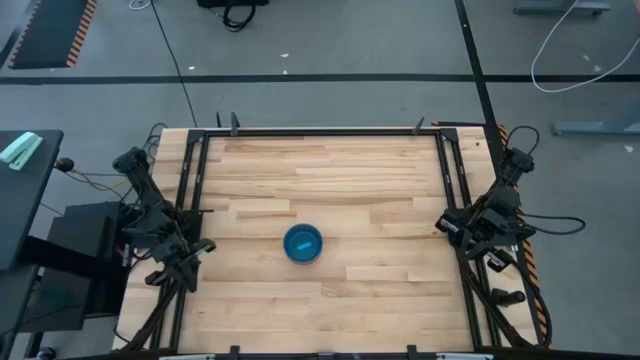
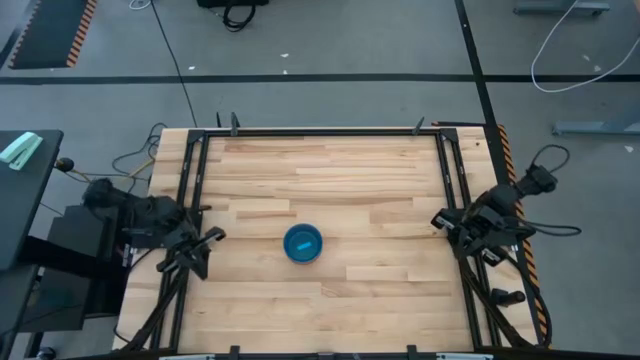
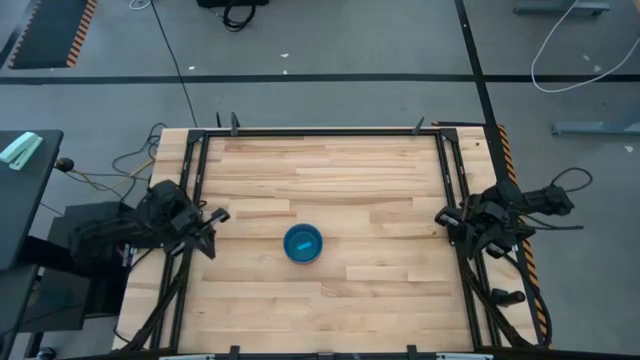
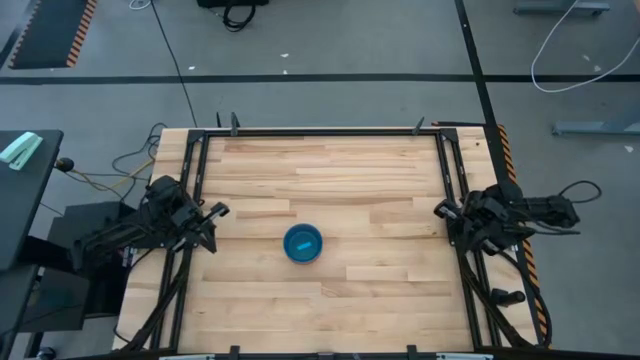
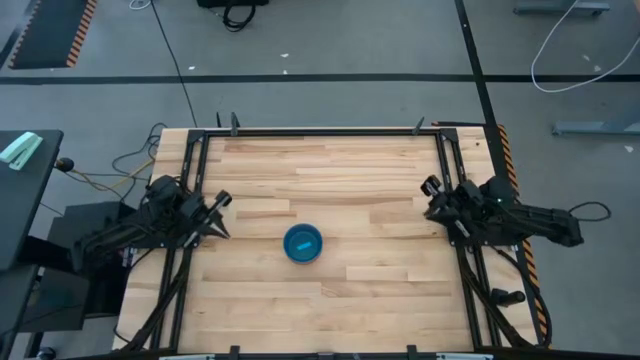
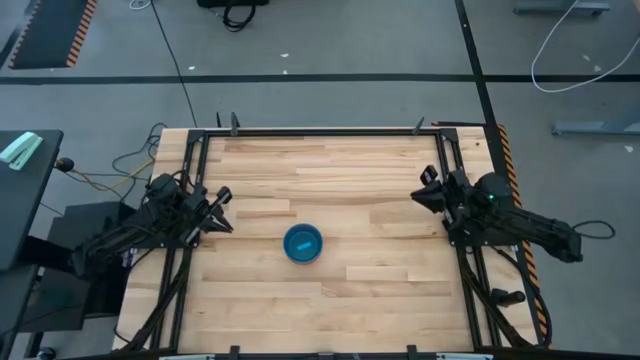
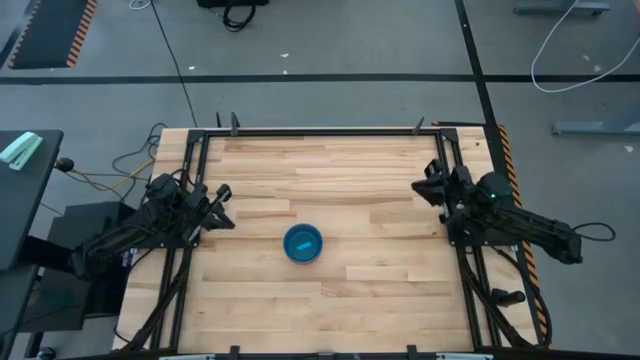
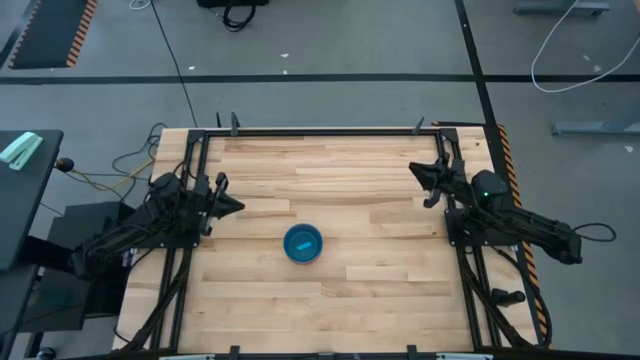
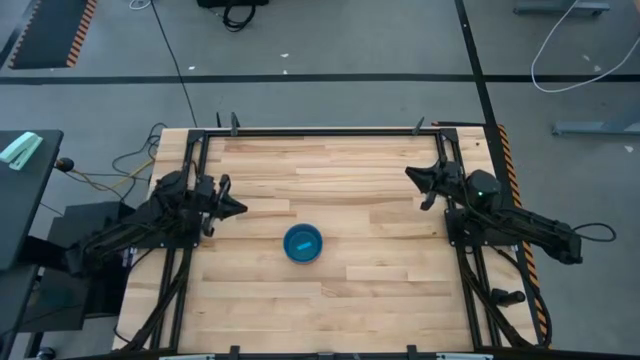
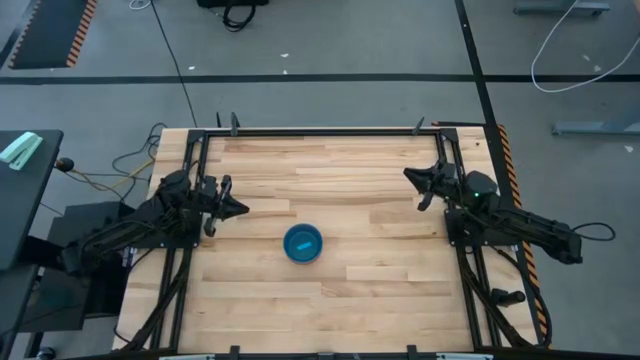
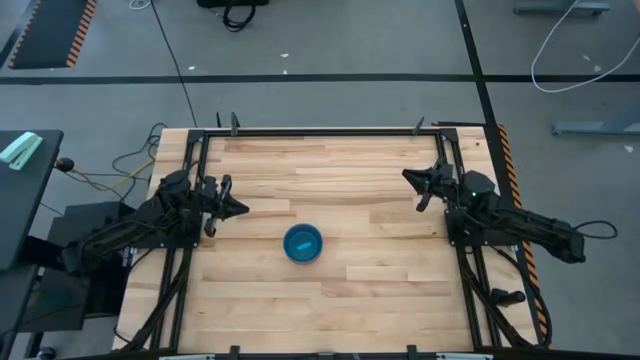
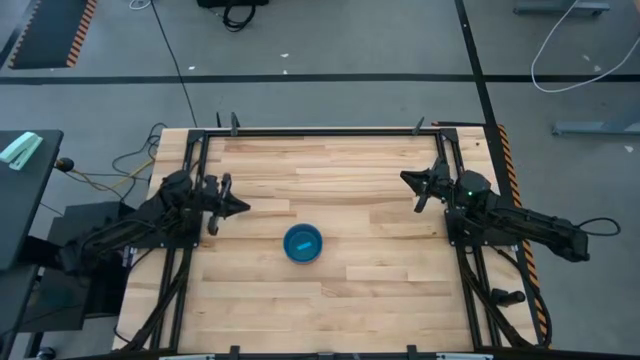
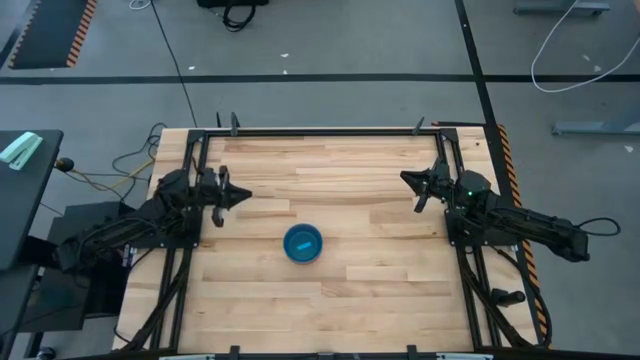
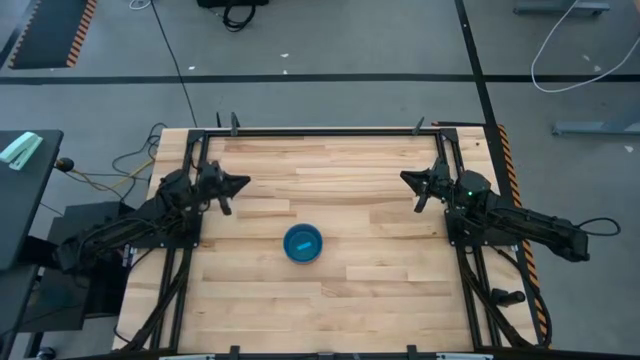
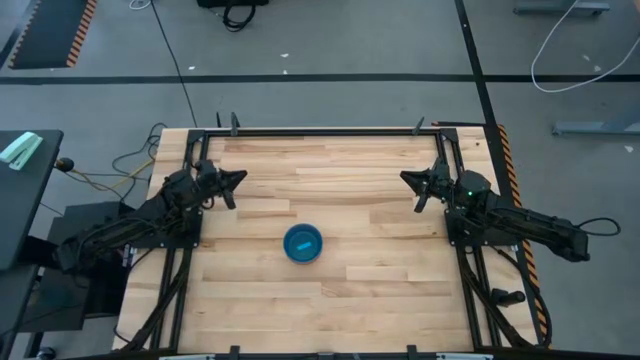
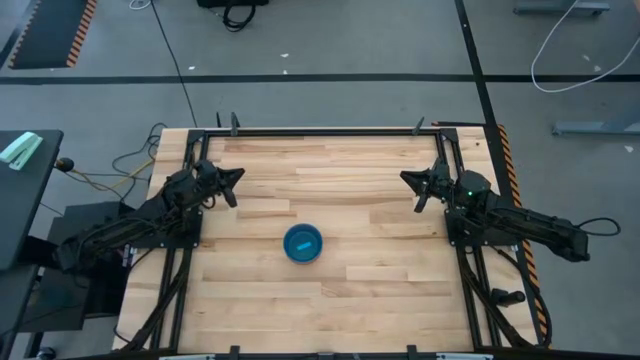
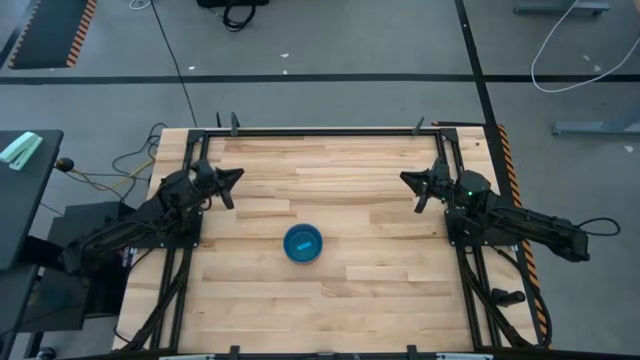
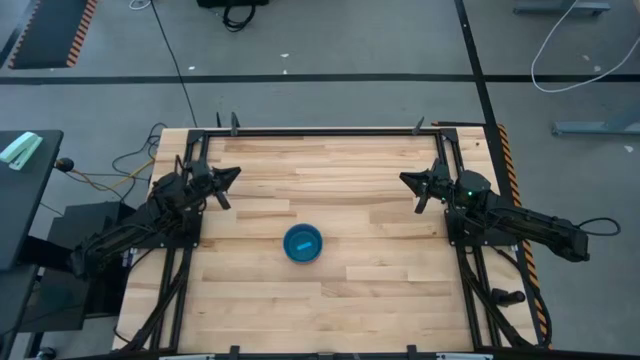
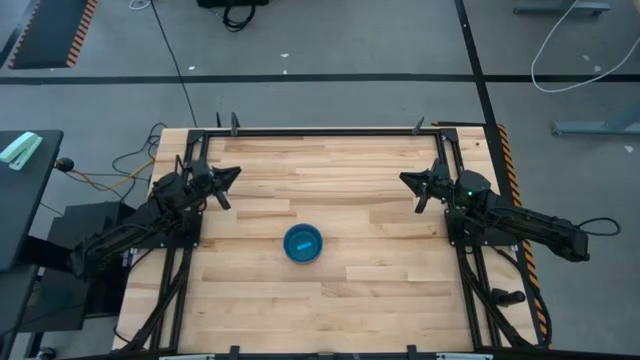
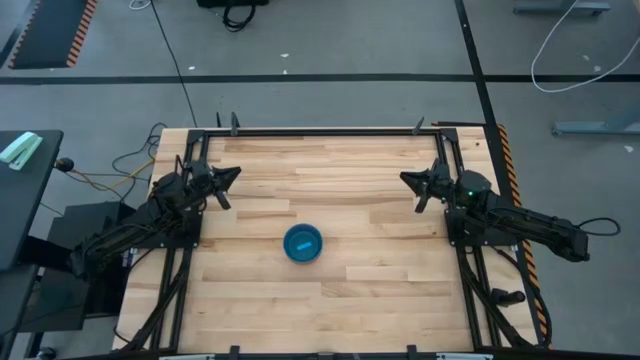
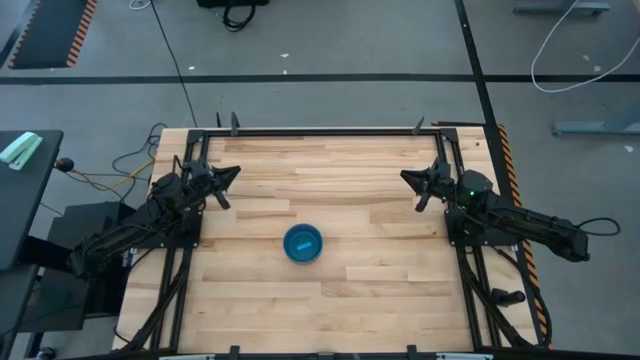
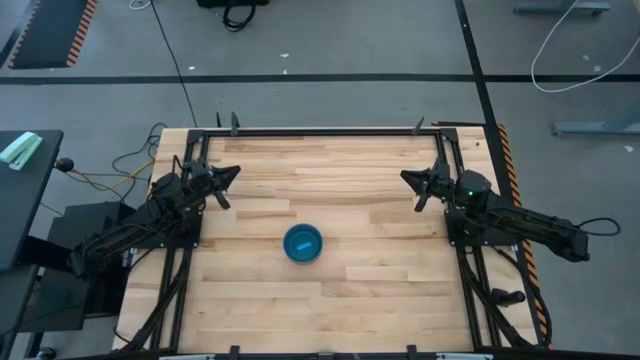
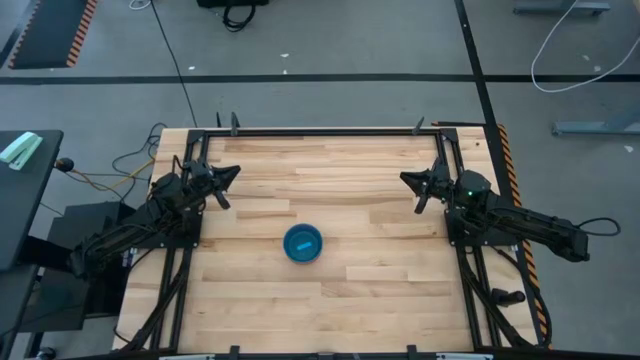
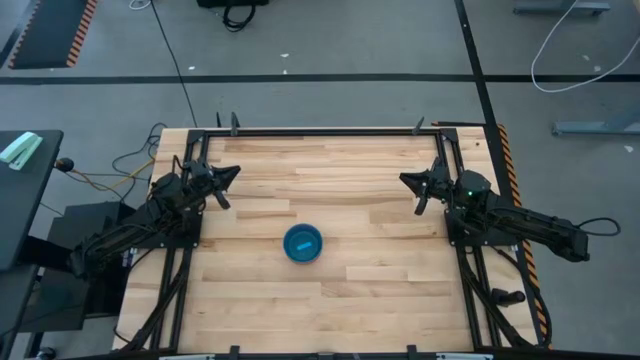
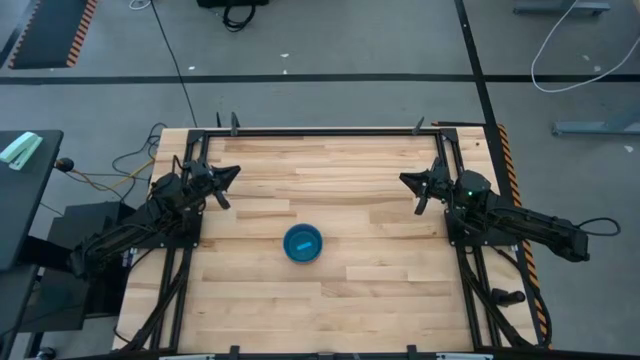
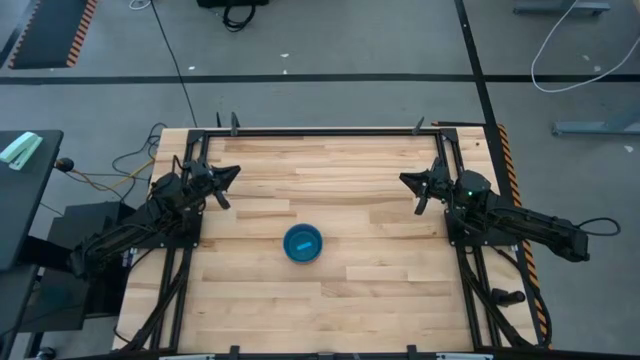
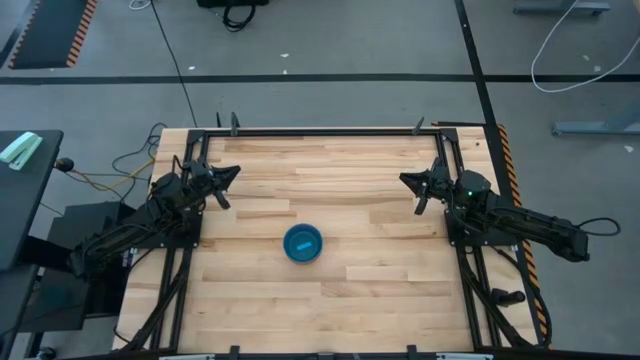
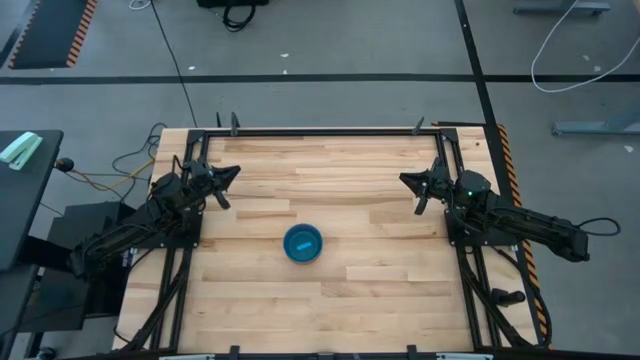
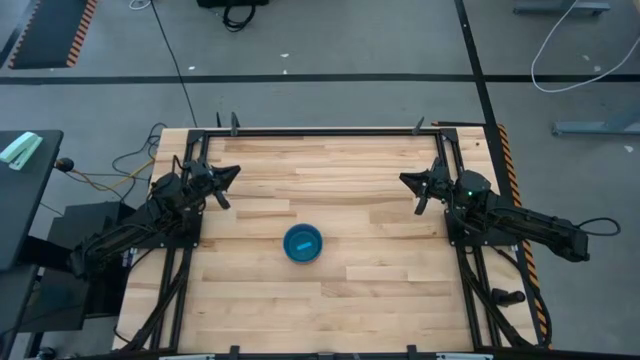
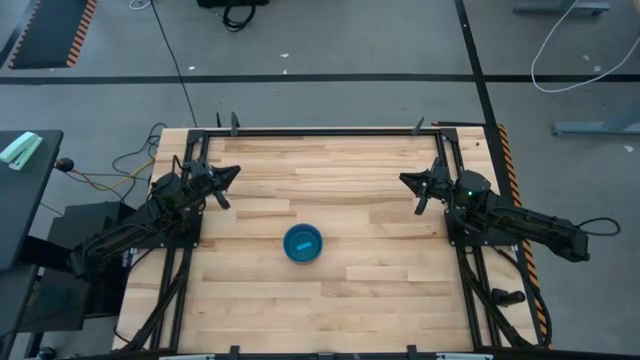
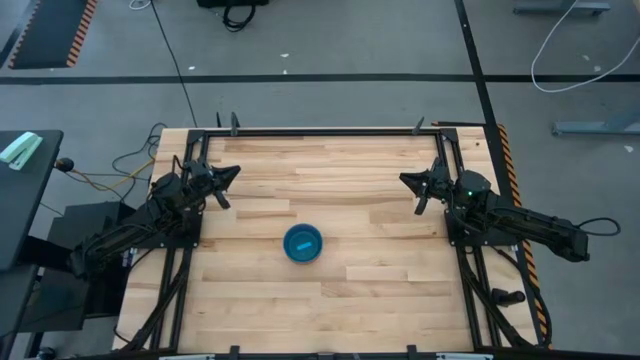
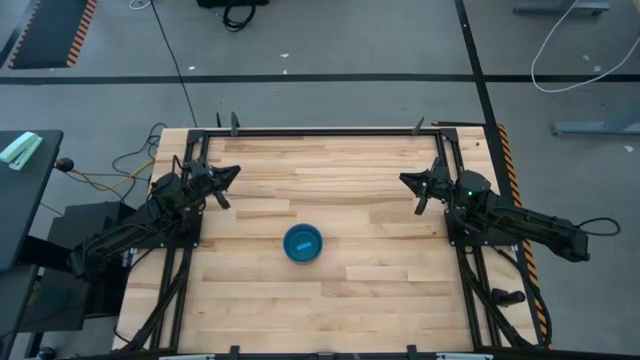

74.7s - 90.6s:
Task: Nest bowls inside each other
Return to Home Position

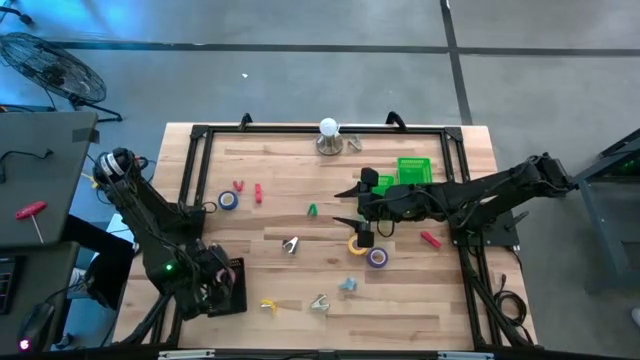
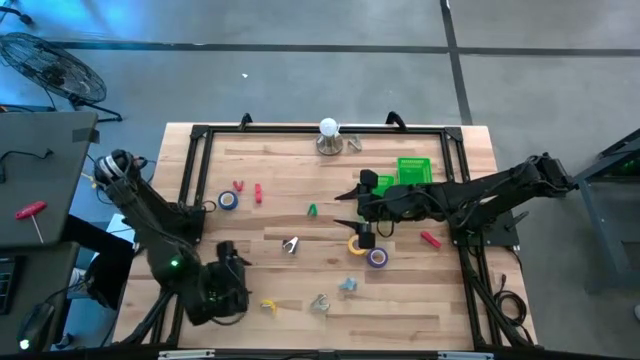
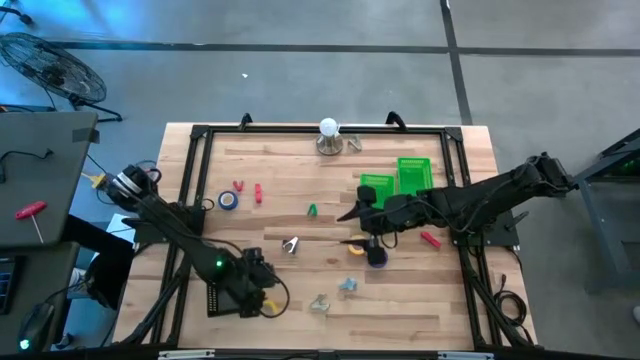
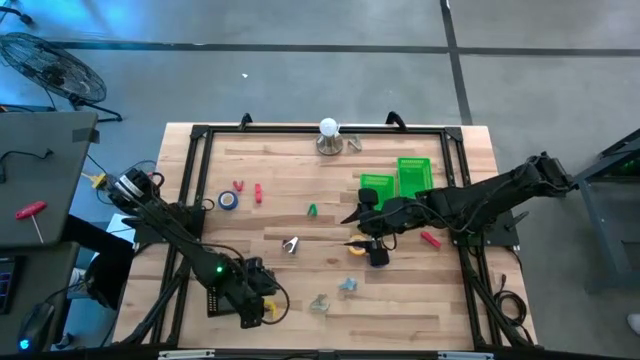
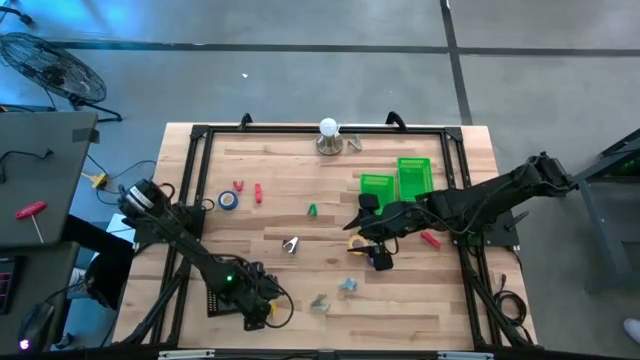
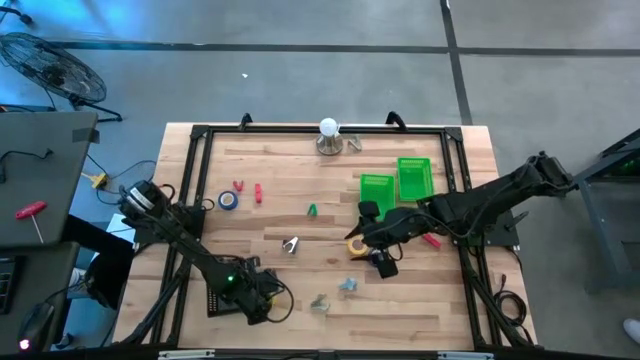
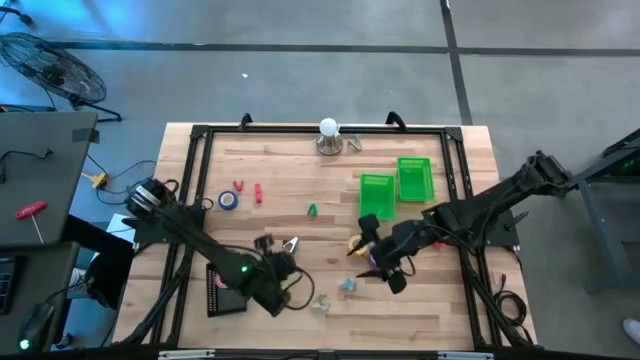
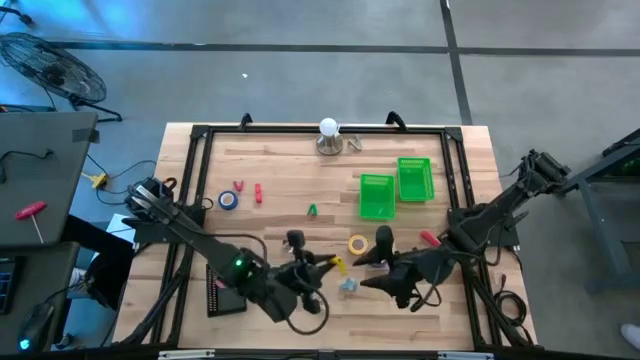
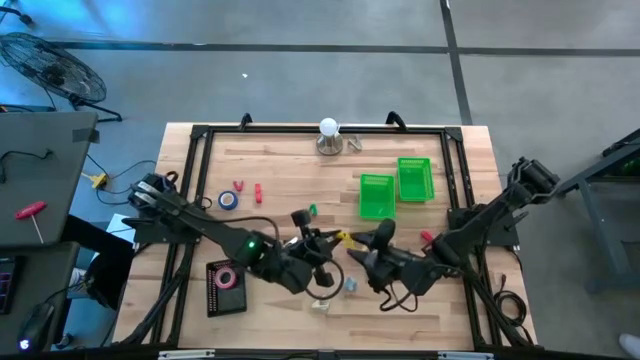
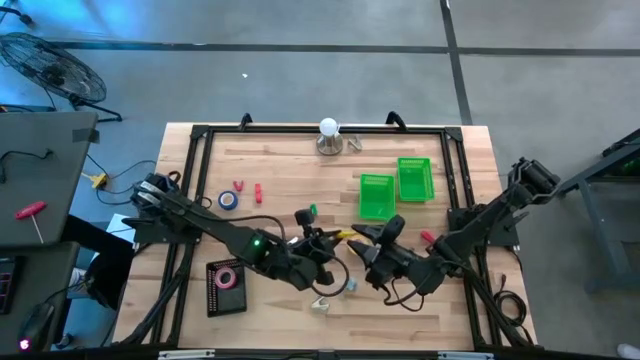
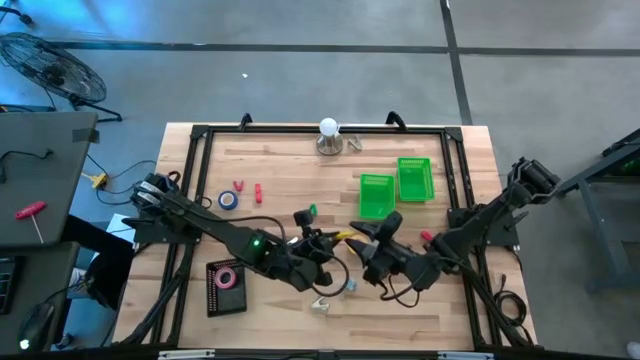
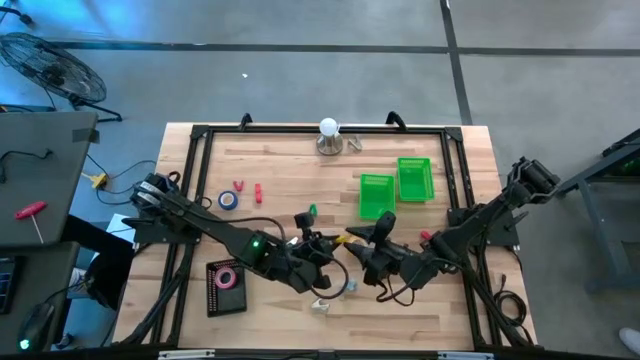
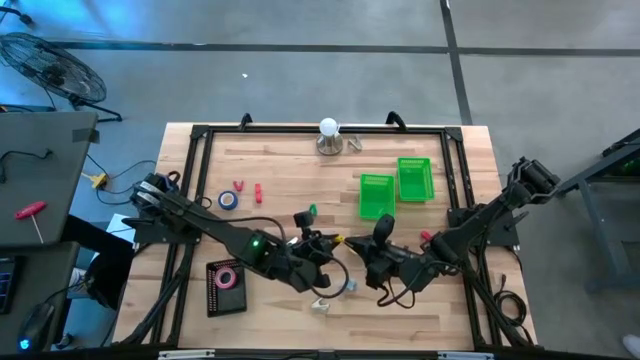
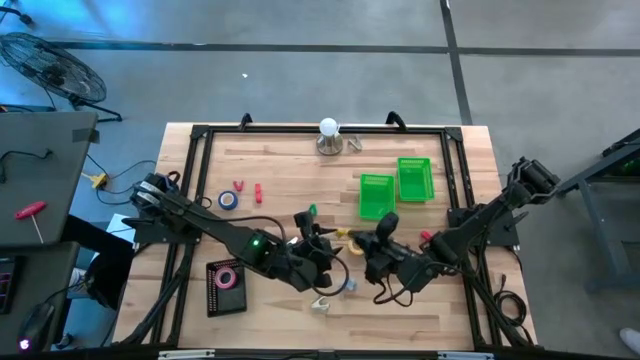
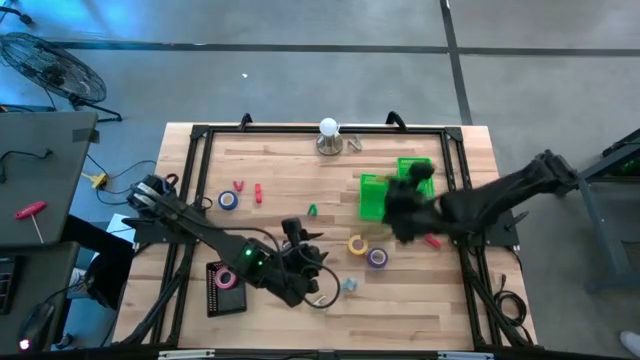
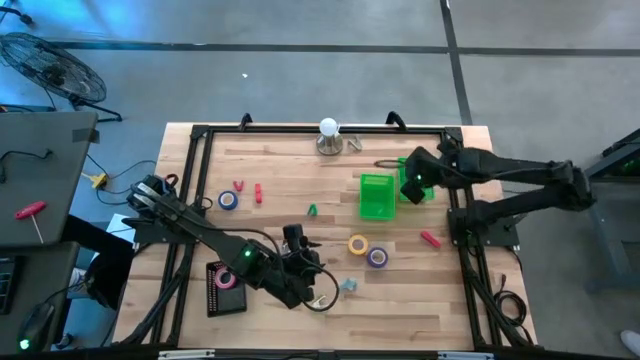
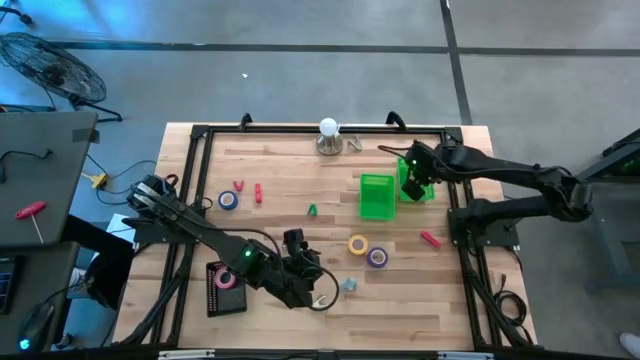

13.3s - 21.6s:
Task: Pick and place Stapler, Stapler remover, tape
Put the yellow stapler into the right green basket
